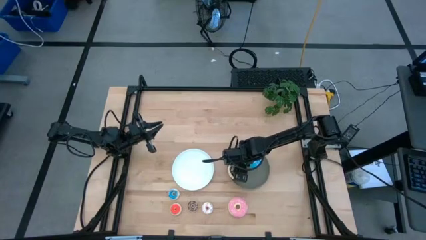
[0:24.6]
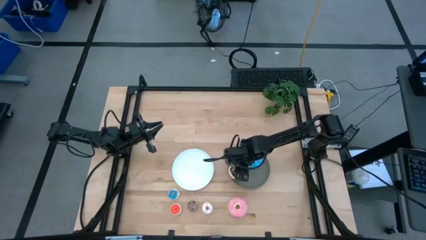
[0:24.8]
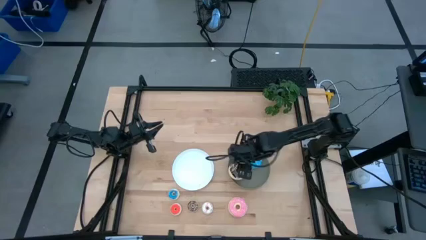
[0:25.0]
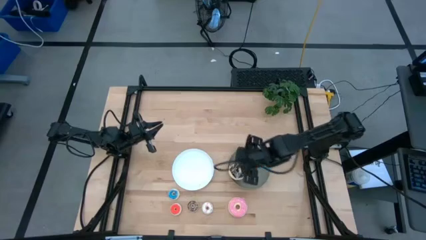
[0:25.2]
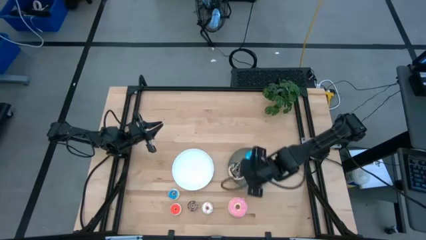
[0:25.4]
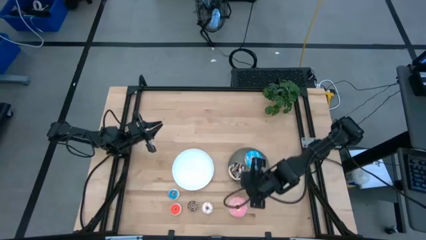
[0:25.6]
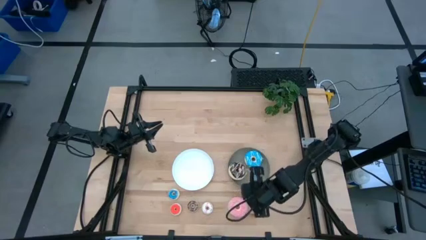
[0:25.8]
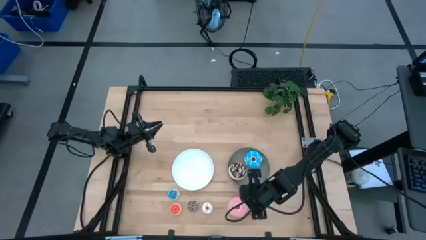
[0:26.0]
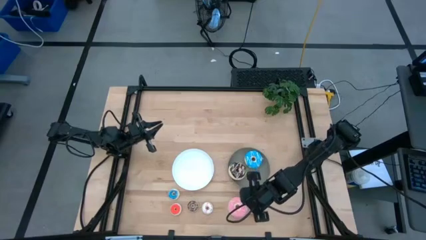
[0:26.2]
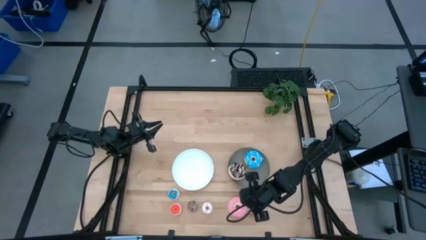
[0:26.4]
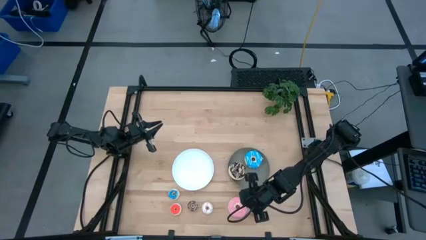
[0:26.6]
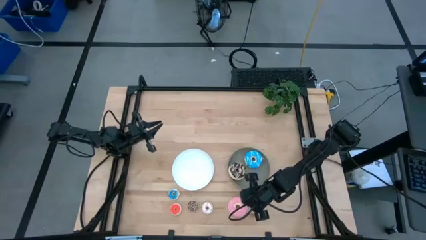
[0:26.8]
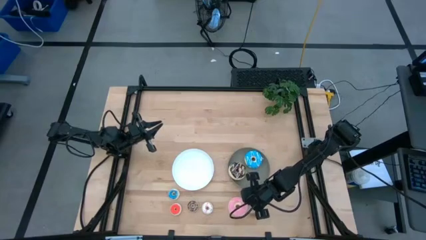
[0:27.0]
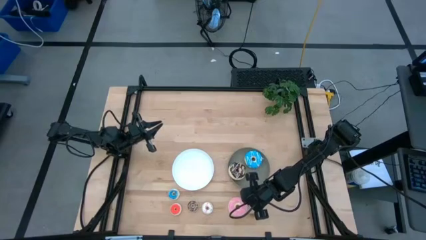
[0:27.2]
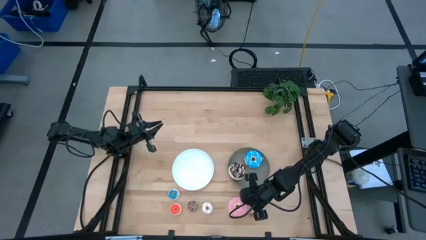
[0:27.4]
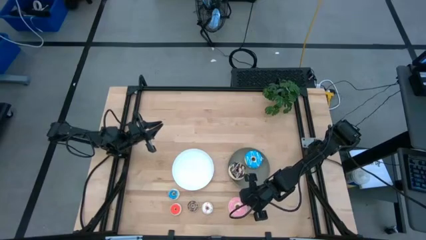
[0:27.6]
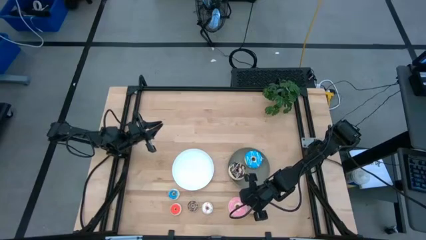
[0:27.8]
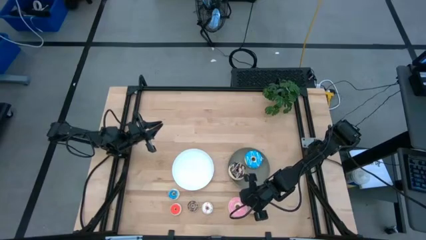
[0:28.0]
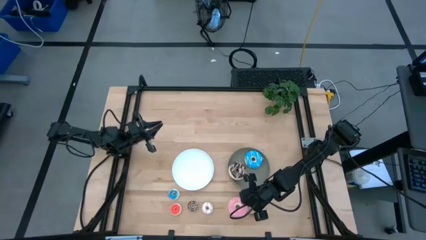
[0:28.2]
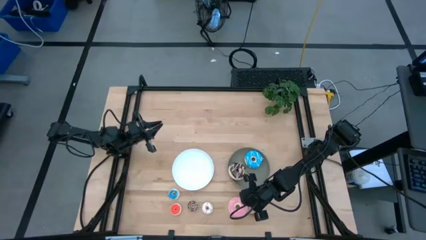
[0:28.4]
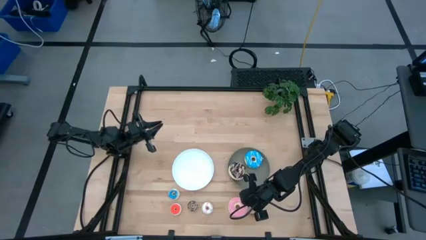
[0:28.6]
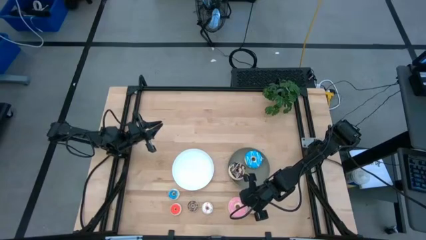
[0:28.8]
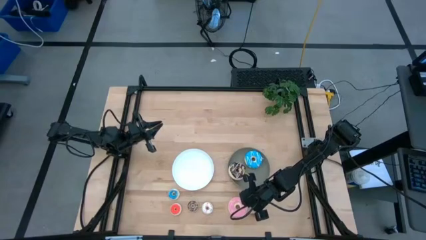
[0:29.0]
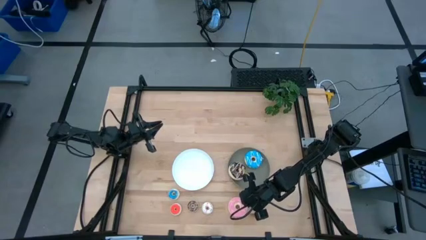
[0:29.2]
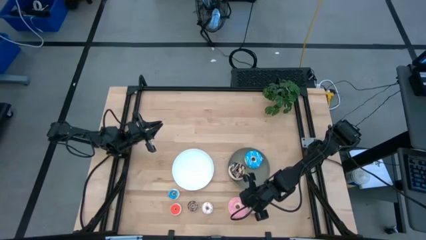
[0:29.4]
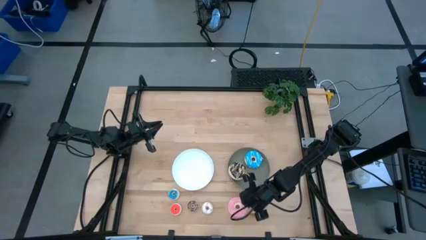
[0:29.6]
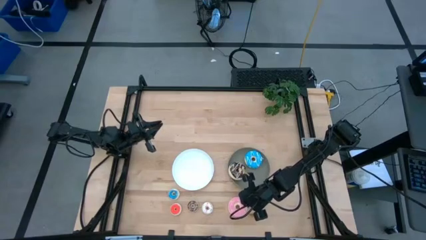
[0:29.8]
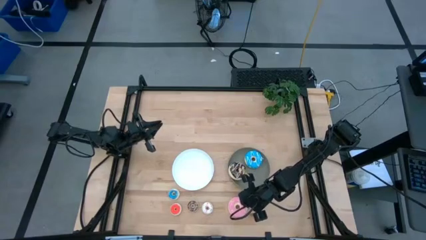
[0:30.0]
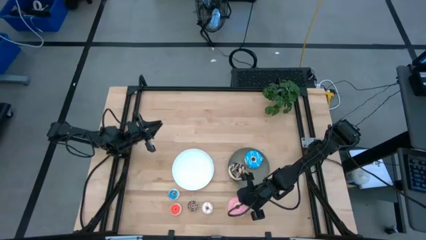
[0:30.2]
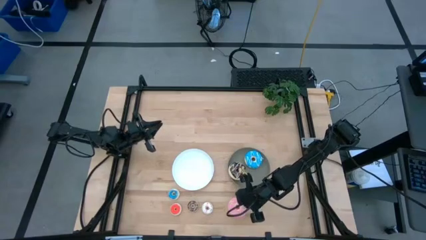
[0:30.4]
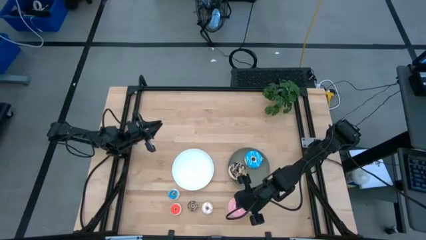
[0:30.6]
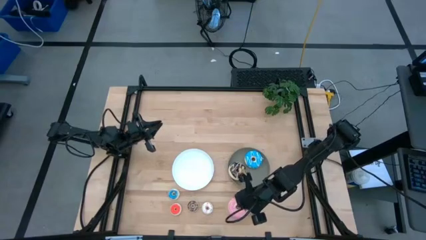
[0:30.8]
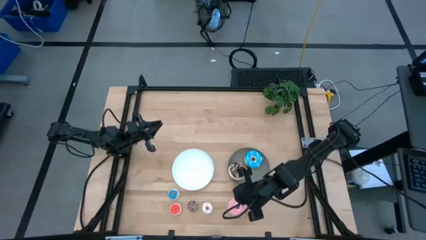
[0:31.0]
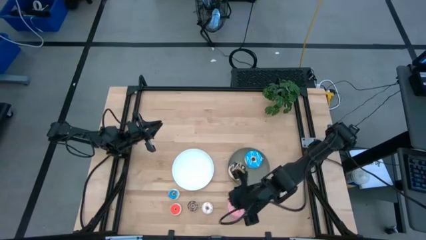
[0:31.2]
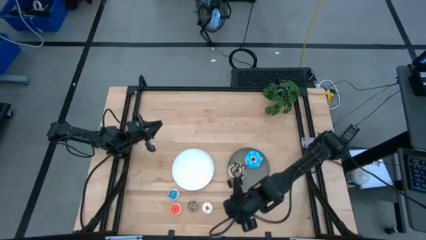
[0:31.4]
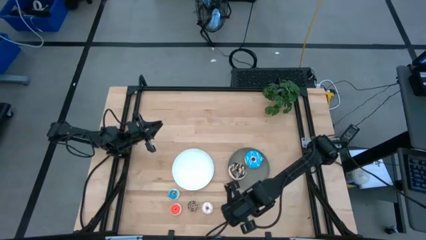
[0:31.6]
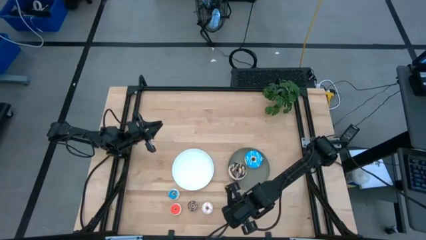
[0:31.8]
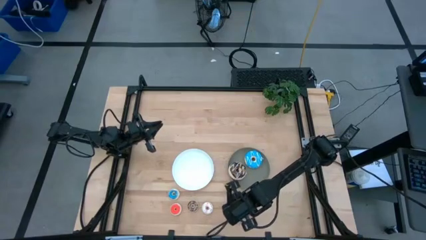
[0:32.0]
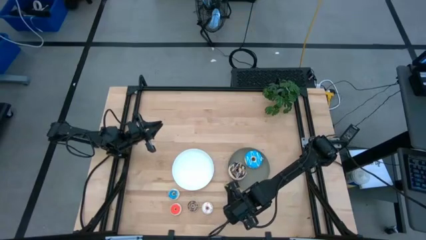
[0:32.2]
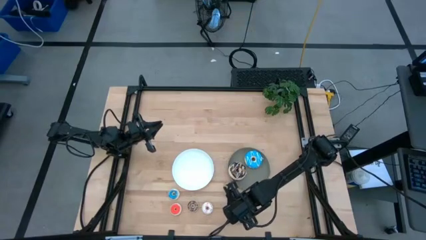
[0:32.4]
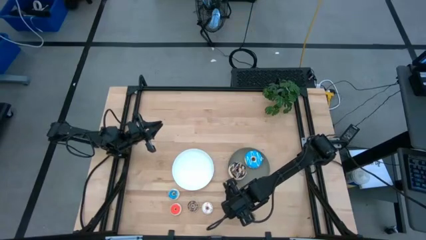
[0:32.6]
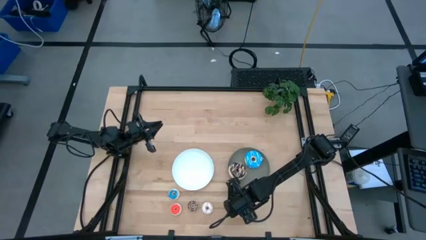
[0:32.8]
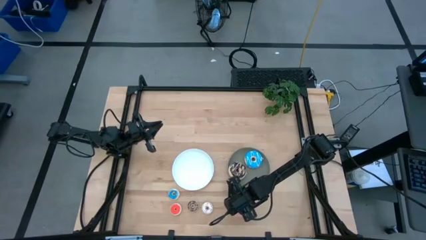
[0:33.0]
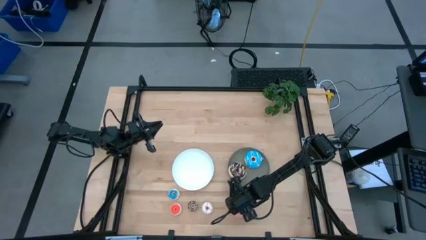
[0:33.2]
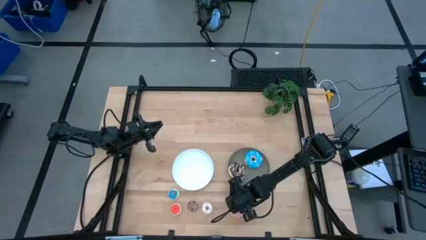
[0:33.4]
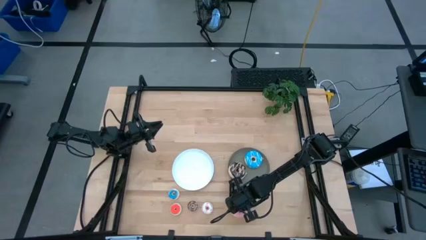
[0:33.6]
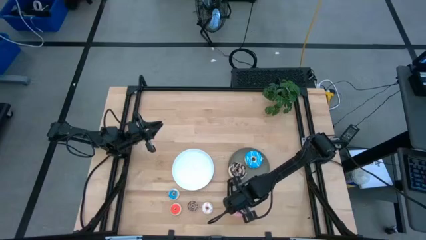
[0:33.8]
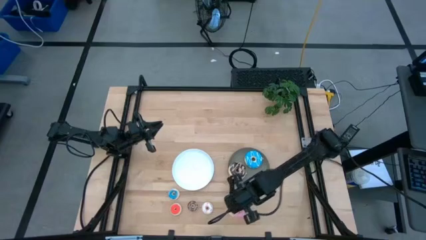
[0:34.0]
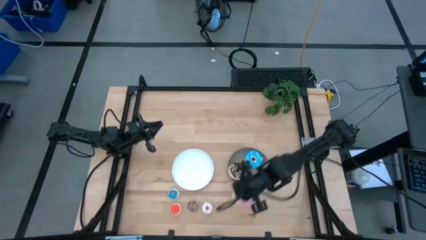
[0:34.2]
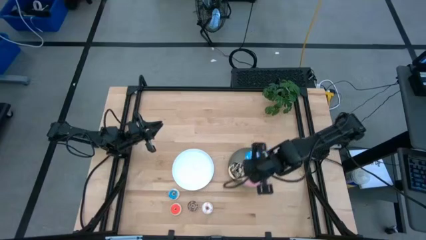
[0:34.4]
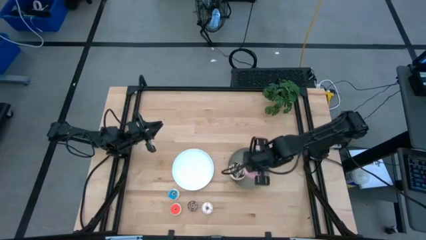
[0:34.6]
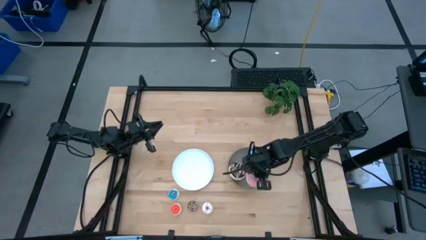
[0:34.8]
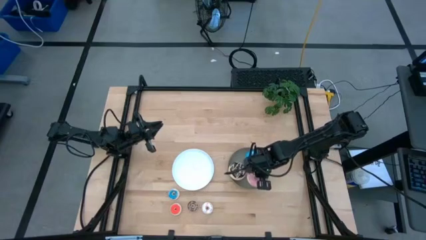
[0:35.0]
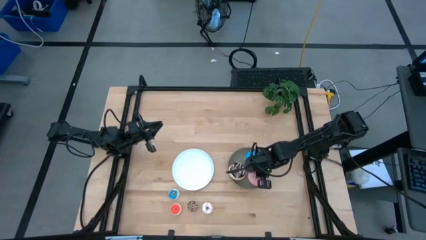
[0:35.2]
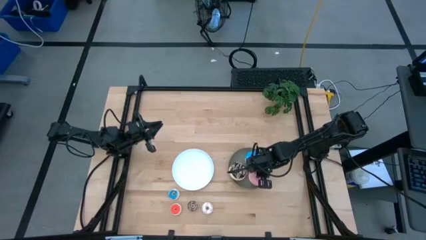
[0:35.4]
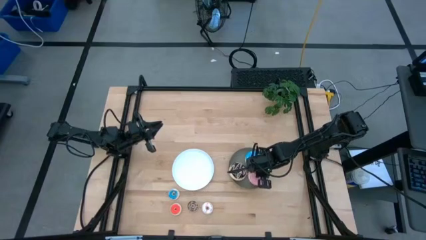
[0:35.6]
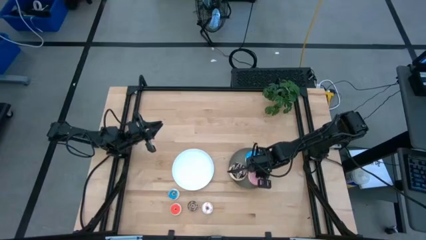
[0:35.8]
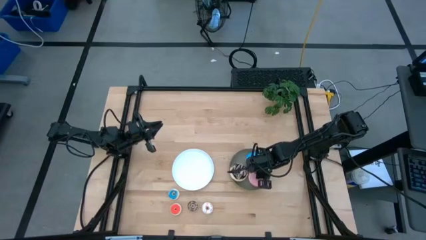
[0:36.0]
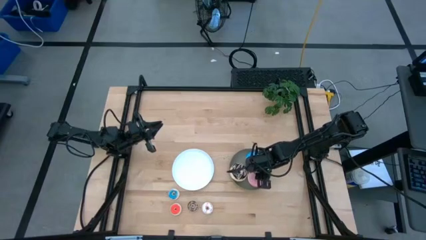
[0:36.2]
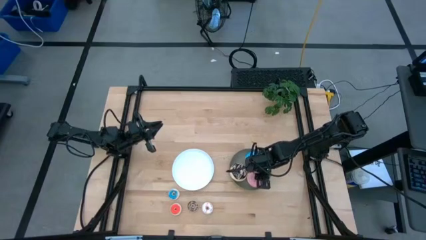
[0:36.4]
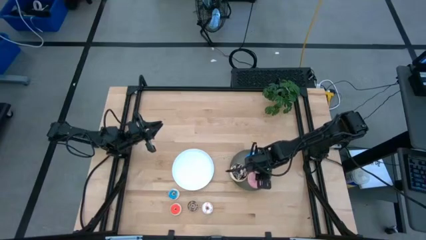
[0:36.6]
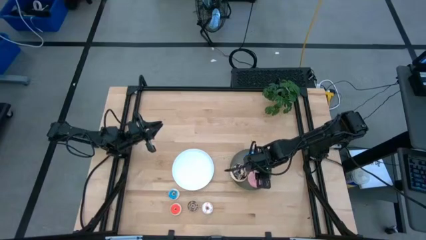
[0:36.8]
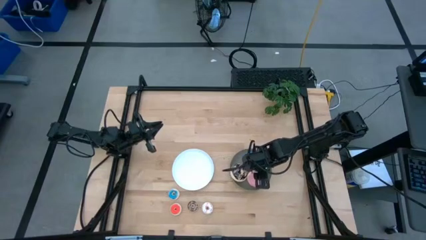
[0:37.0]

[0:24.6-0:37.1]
Task: Pick & Place donuts
Put the big pink donut on the gray plate

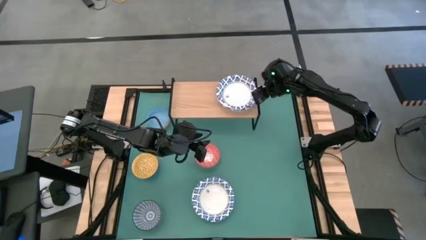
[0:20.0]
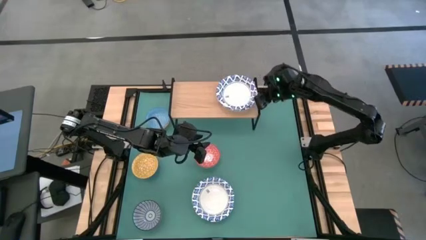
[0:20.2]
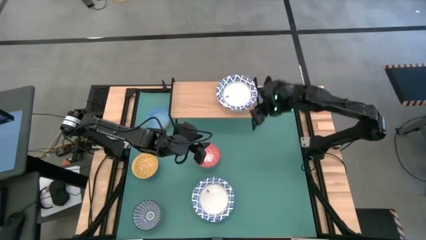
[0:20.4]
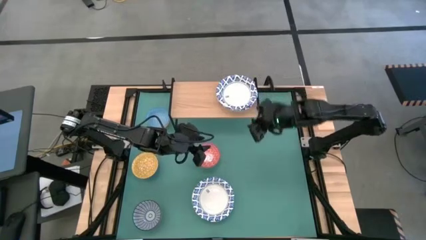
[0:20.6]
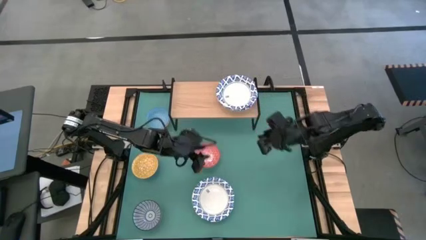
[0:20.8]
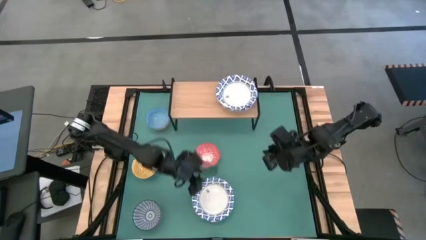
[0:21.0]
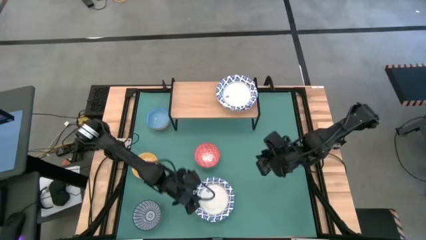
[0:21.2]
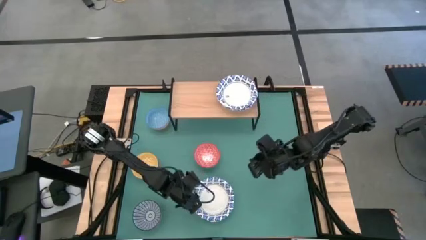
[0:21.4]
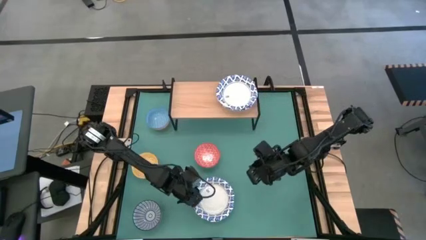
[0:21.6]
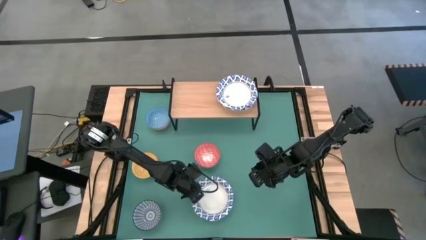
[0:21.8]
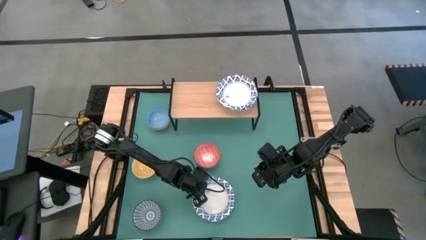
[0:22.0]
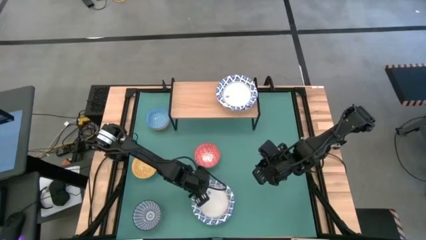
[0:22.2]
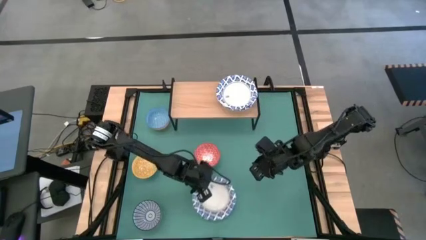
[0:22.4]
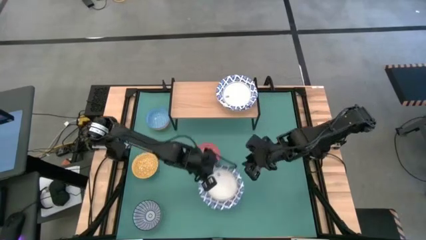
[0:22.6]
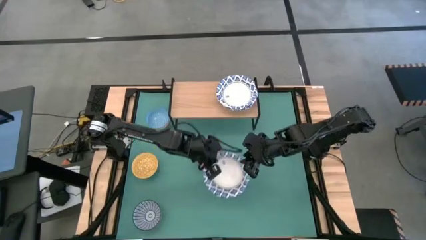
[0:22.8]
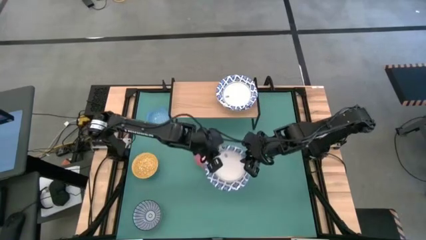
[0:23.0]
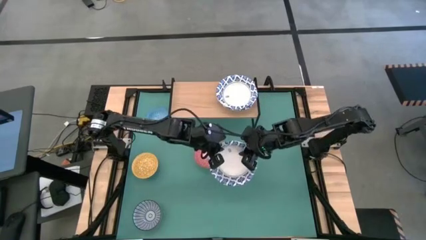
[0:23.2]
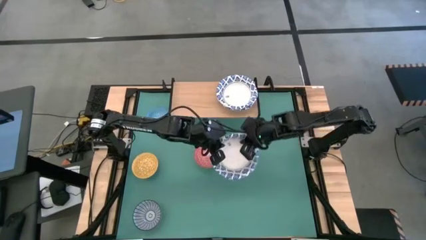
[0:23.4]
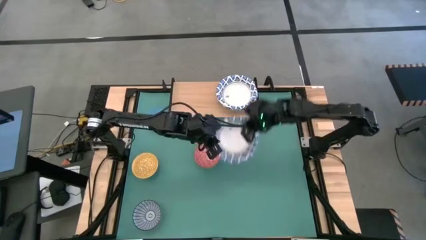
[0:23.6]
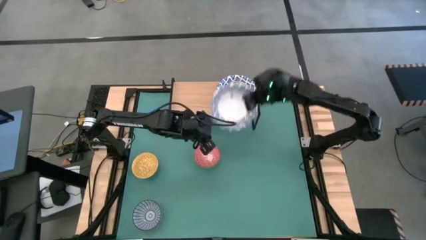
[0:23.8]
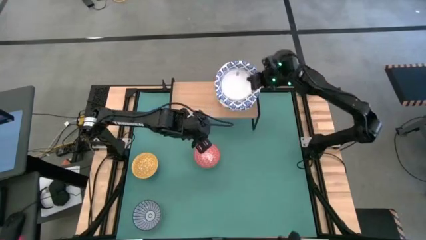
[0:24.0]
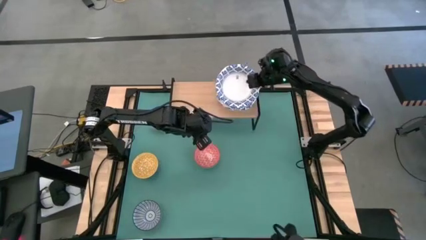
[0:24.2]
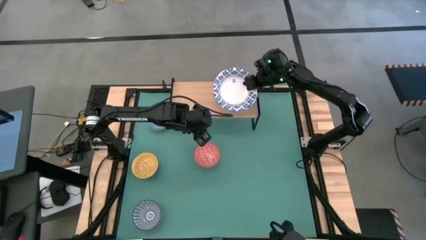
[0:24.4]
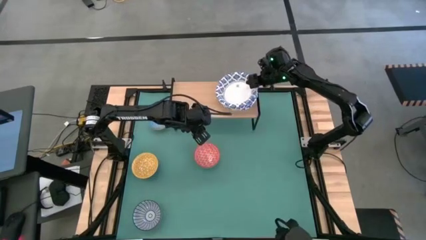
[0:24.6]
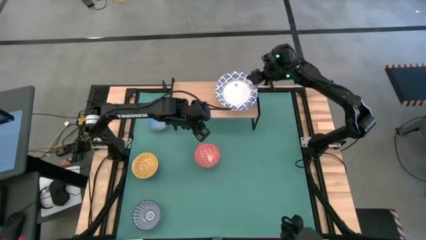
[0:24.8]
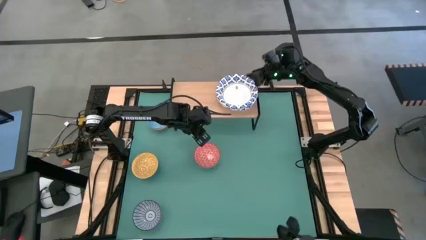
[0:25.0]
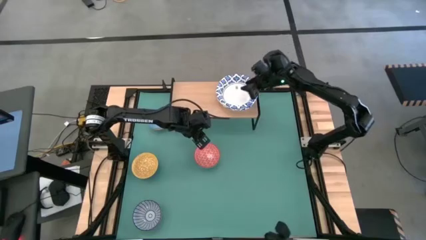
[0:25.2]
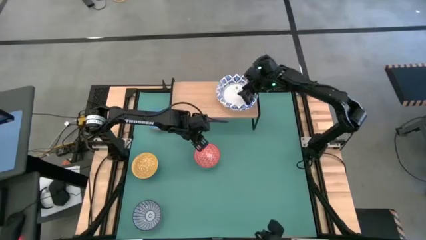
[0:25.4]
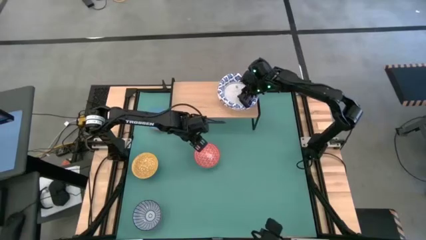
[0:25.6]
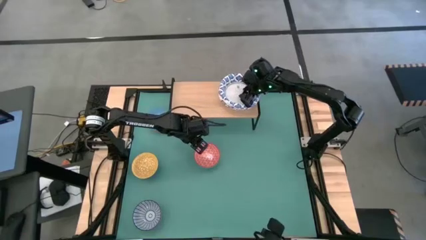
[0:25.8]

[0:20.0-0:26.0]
Task: Place and stack bowls onto a shelf
Stack the white patterned bowl on top with the other white patterned bowl on the shelf
